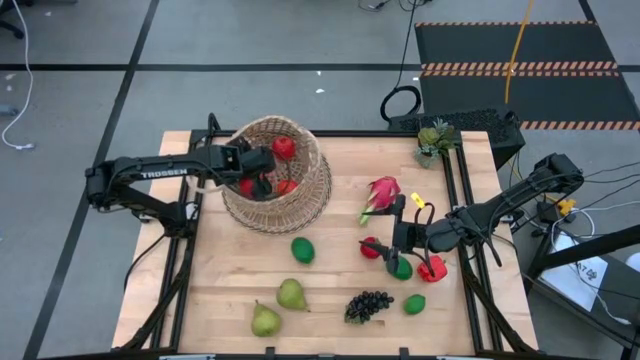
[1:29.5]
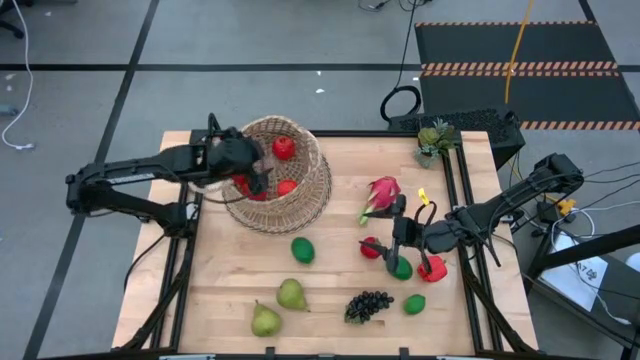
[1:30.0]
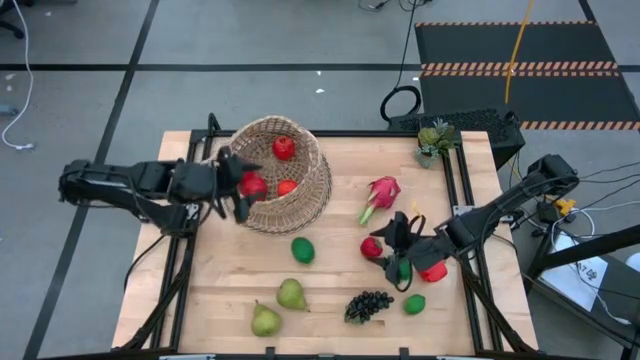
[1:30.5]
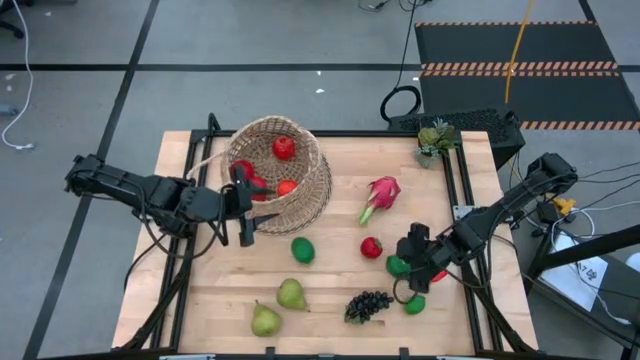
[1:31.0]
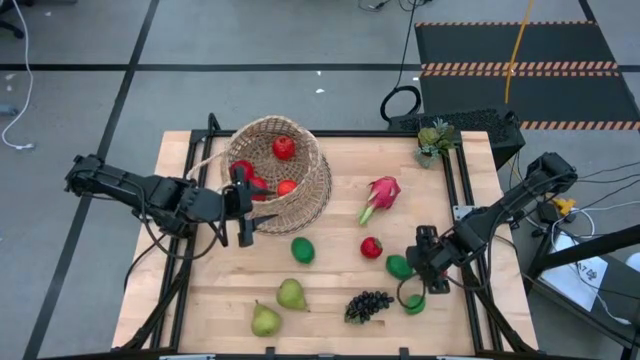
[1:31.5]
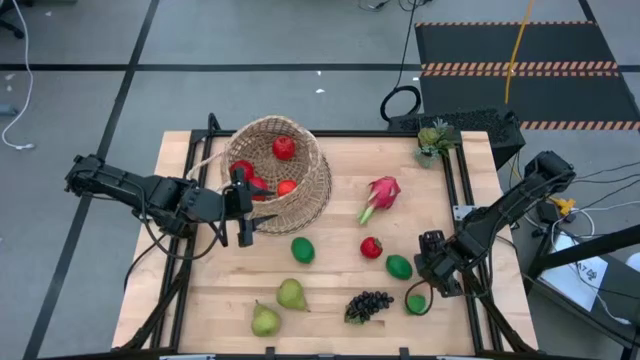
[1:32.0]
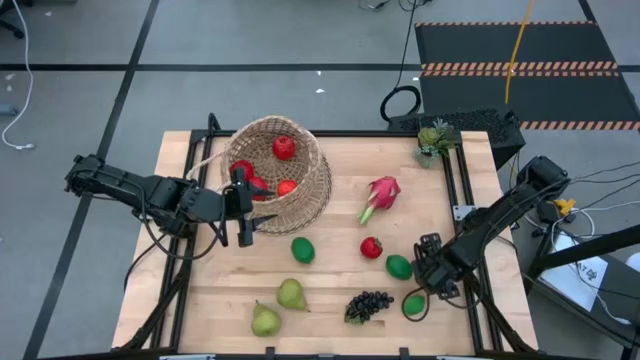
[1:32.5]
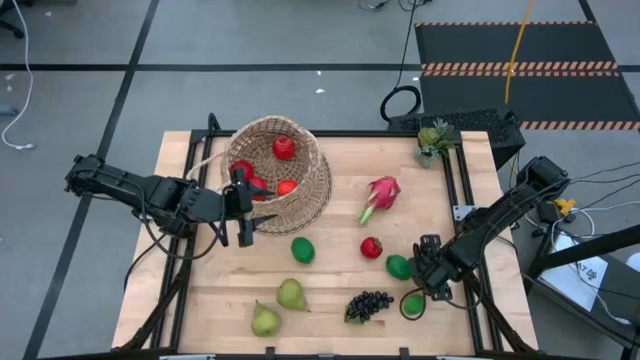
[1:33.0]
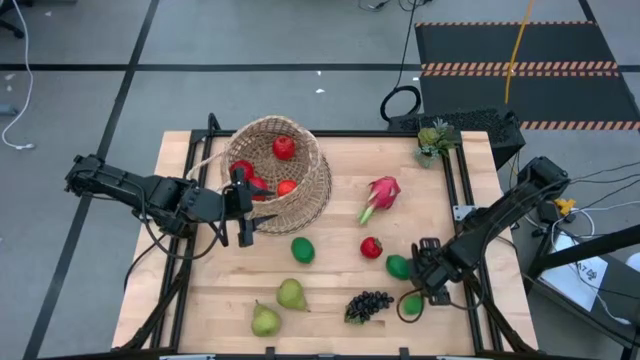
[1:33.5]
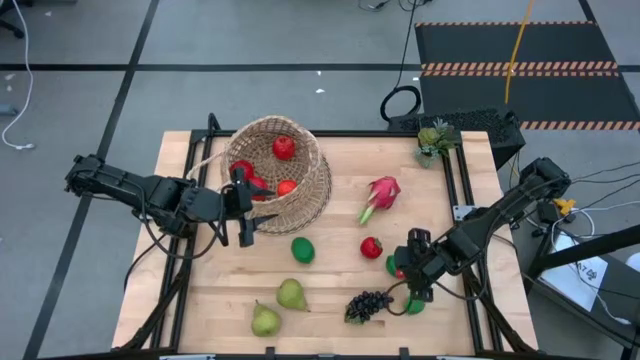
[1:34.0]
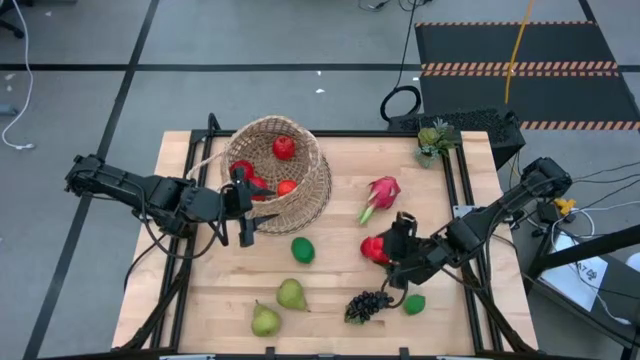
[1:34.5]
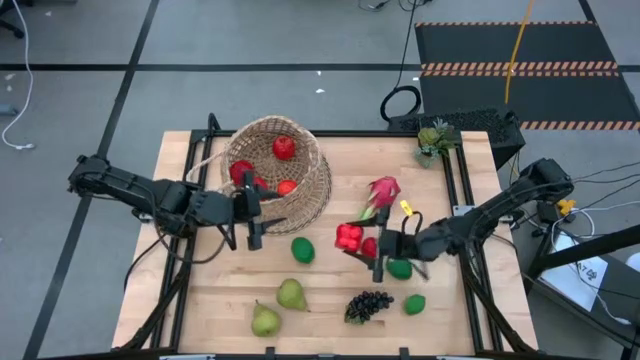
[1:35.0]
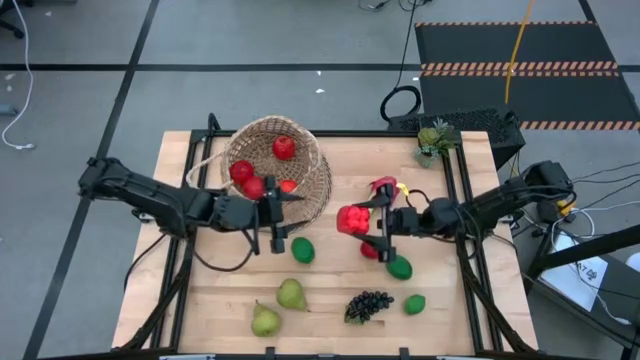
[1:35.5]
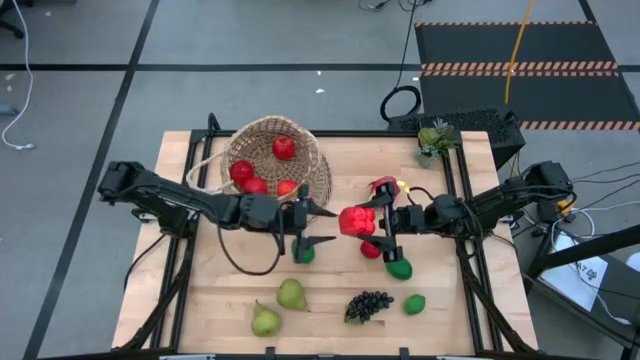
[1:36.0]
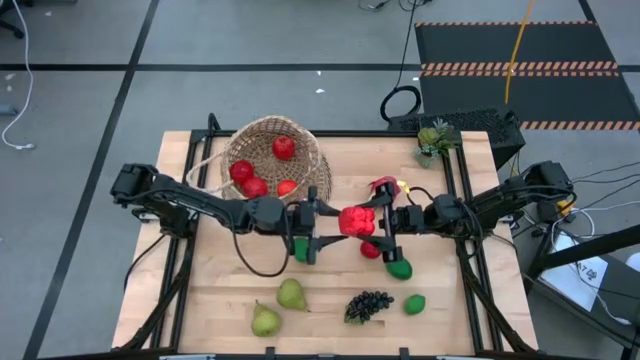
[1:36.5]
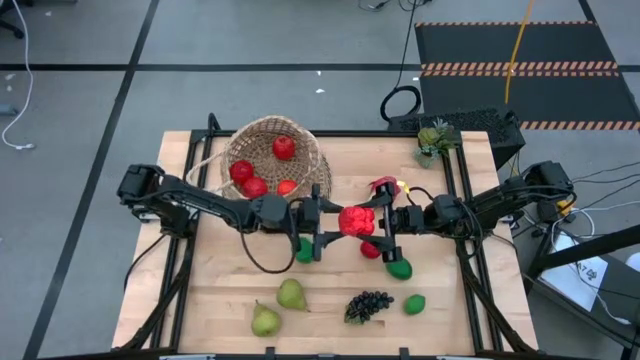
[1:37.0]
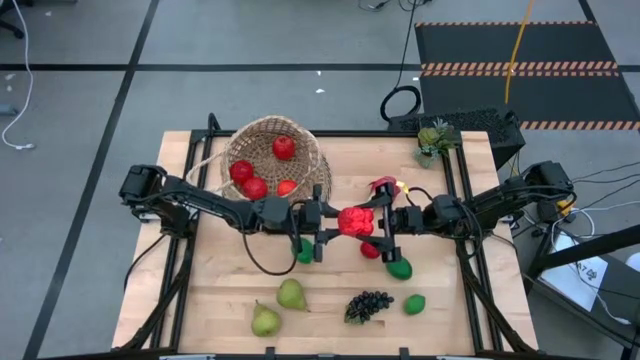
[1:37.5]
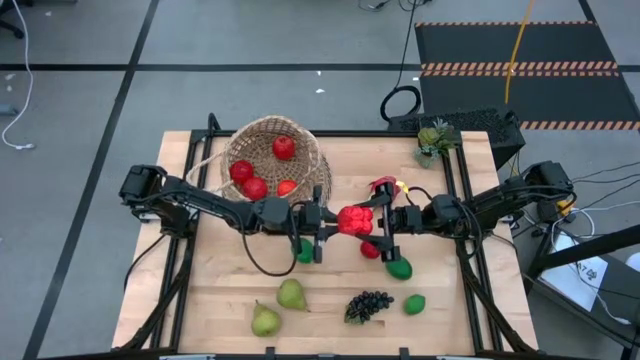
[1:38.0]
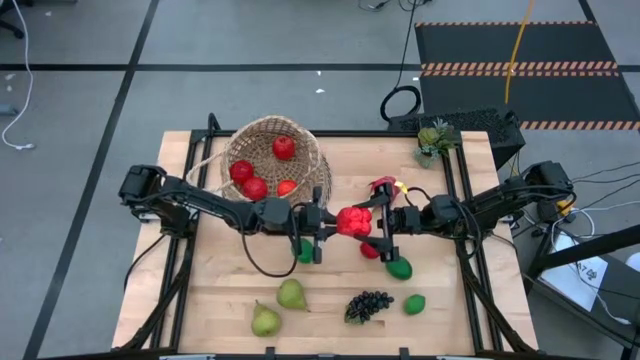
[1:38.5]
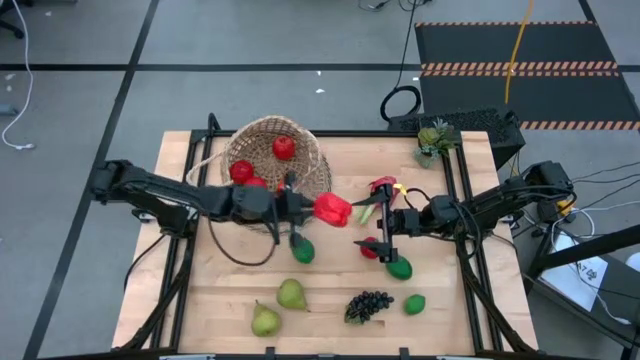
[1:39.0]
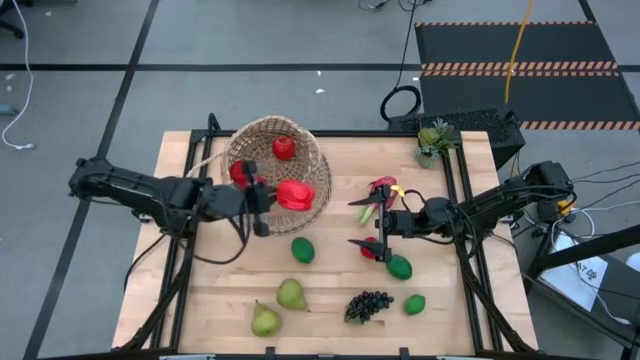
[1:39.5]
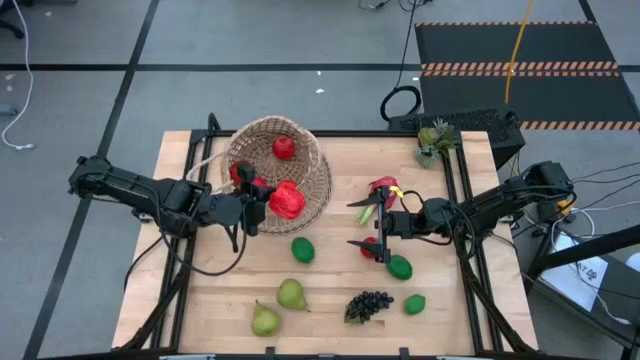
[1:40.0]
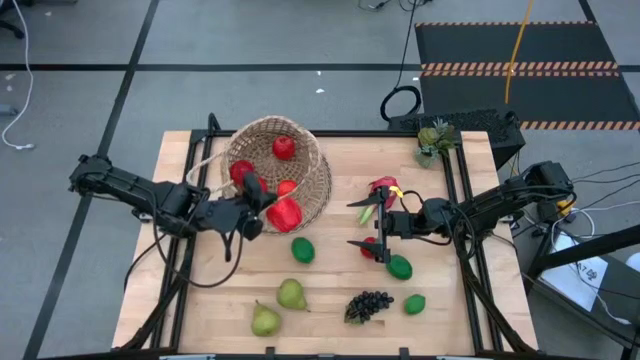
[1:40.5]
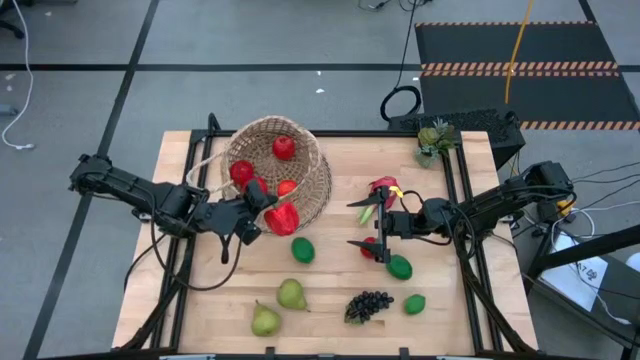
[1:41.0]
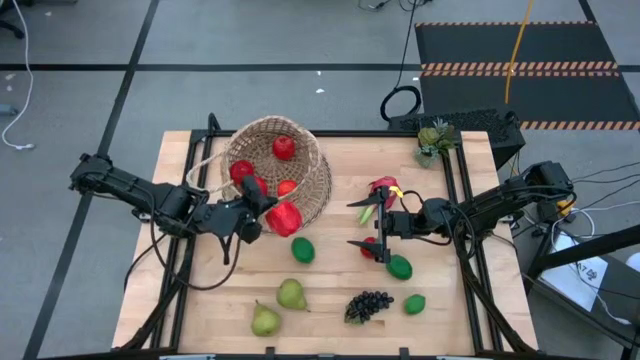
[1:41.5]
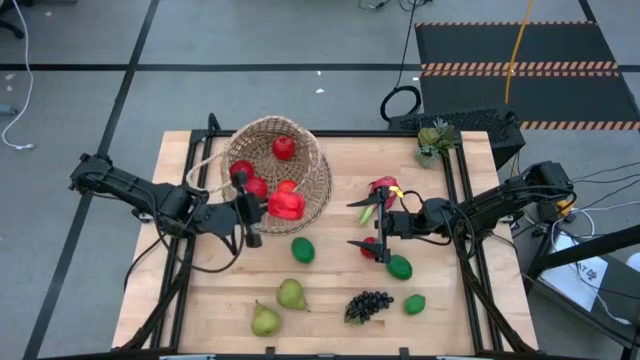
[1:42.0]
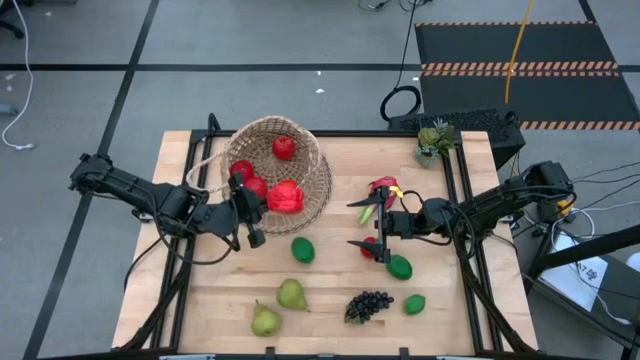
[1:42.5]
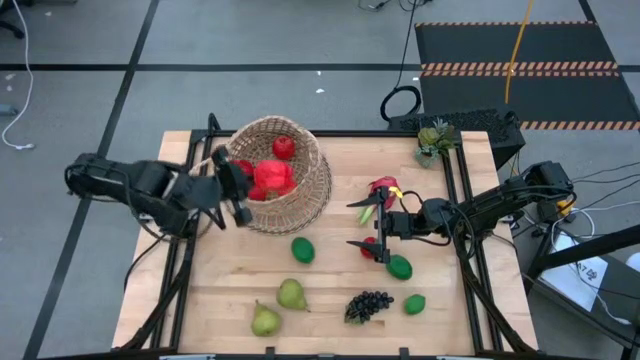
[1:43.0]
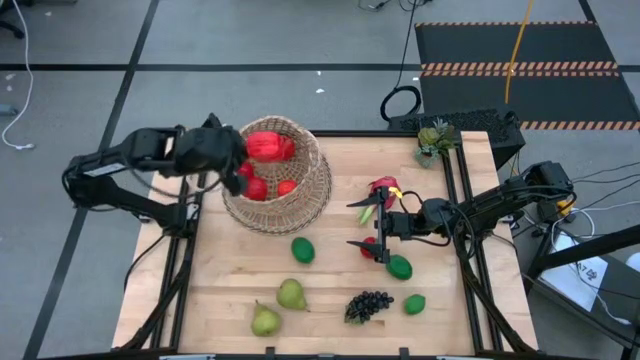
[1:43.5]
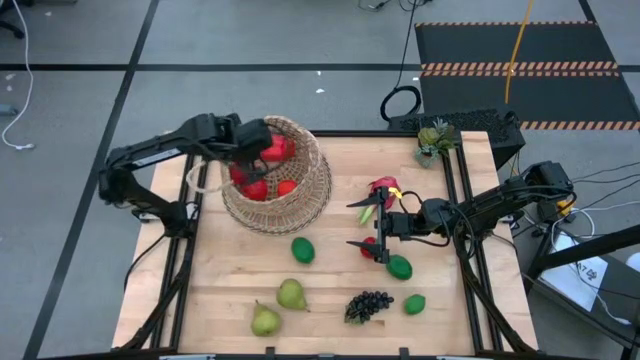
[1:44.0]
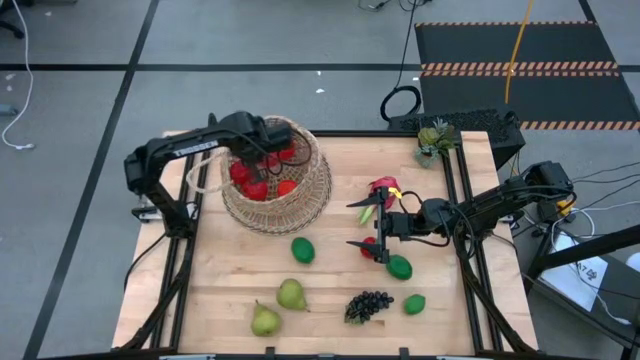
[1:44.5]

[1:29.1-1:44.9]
Task: Build produce basket
Put the bell pepper into the basket

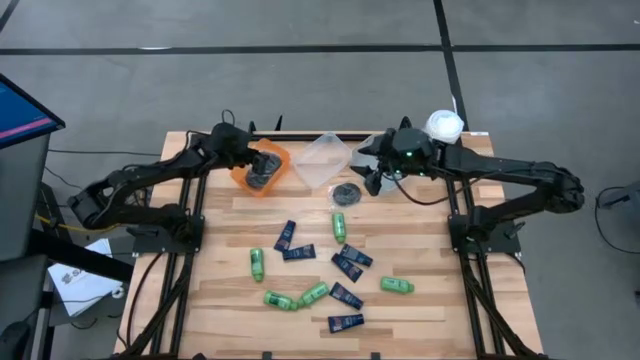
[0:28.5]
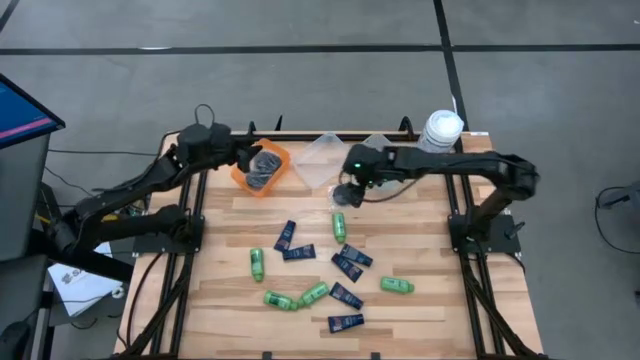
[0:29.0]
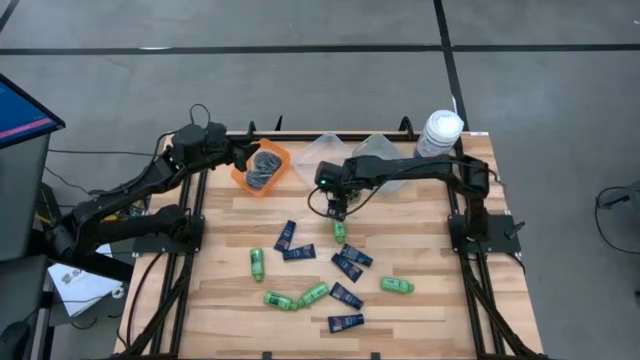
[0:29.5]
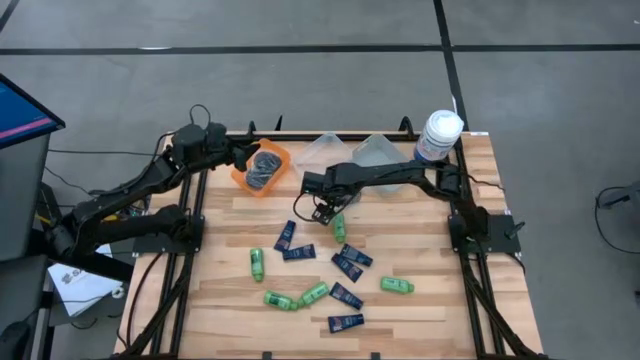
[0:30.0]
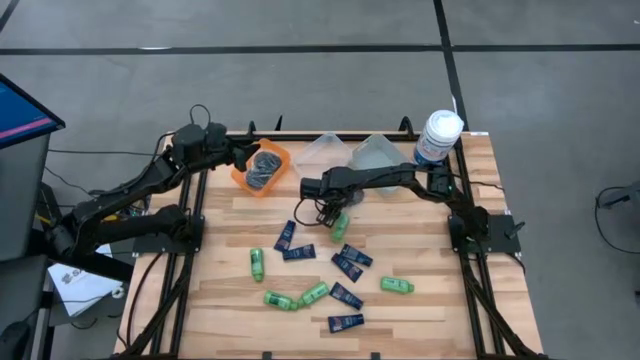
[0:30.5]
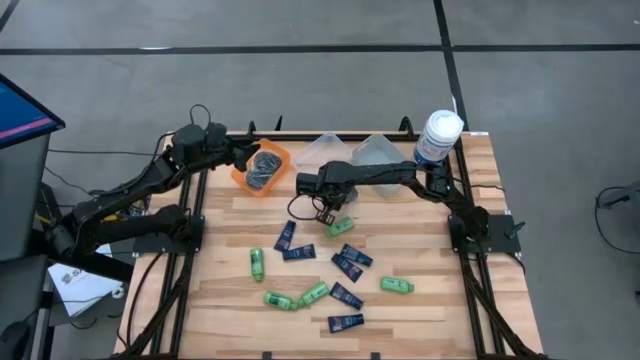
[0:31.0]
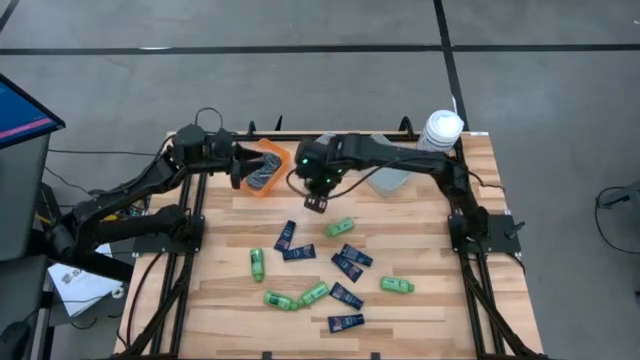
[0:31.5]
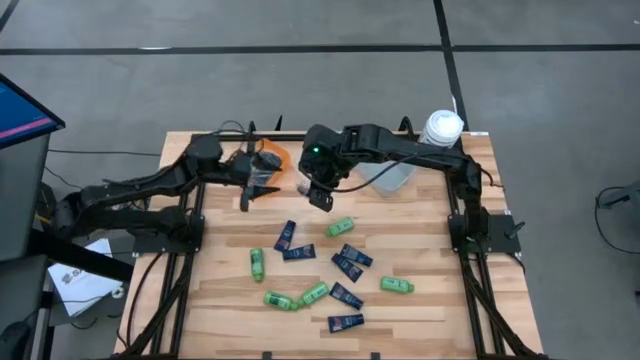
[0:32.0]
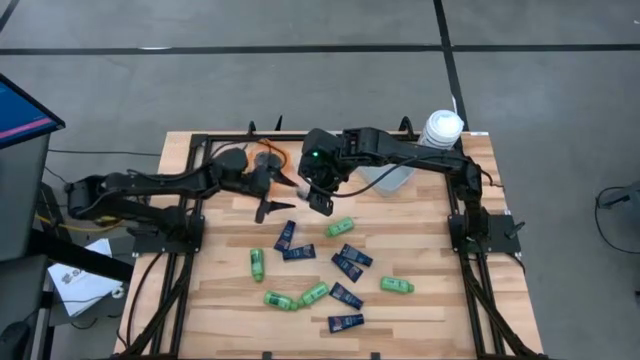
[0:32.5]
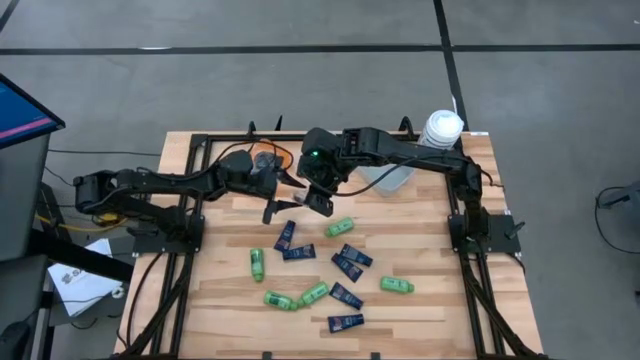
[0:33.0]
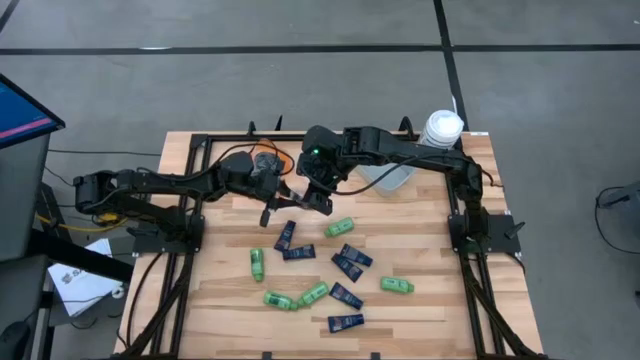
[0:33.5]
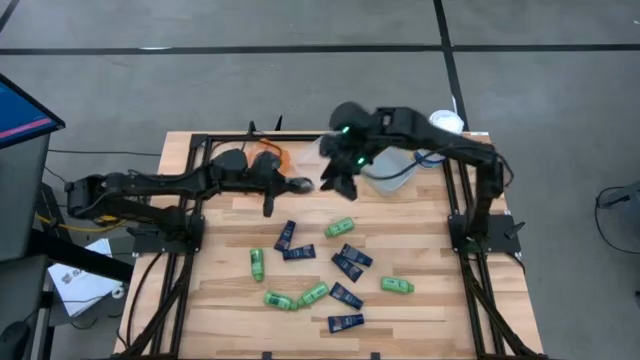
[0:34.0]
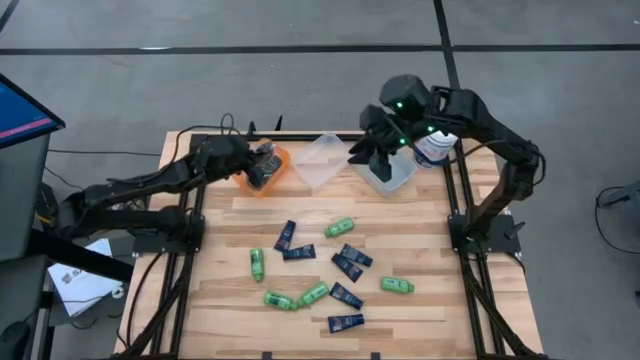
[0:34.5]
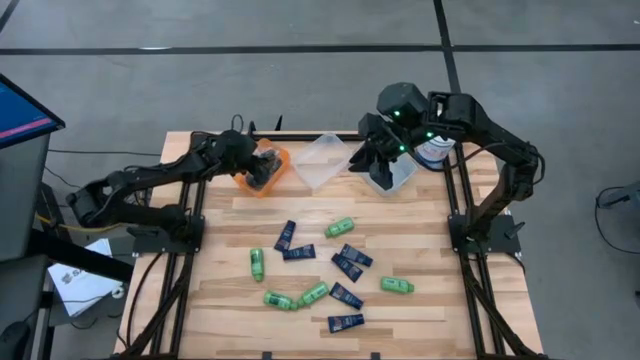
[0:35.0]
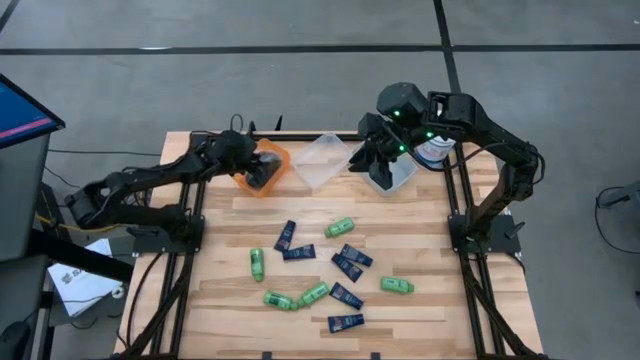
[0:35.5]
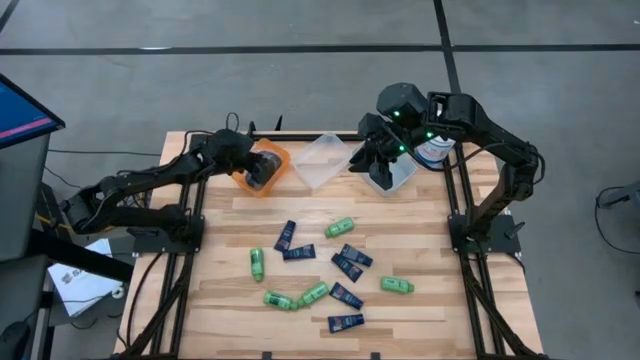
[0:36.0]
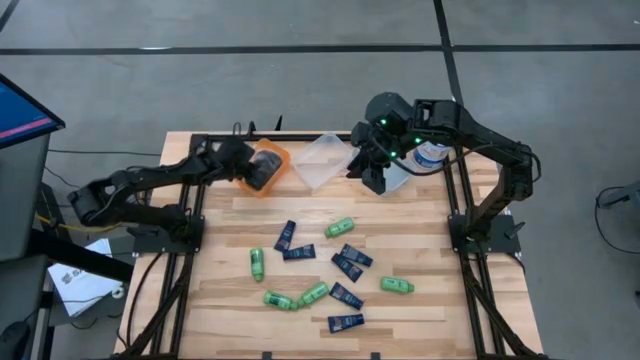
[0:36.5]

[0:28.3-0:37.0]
Task: Pick & Place Travel size toiletries
Put the hairbrush into the orange bin
